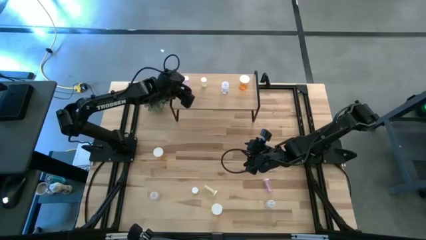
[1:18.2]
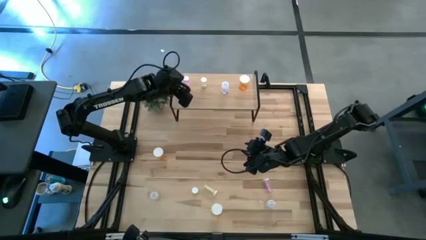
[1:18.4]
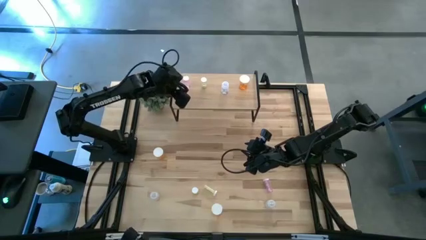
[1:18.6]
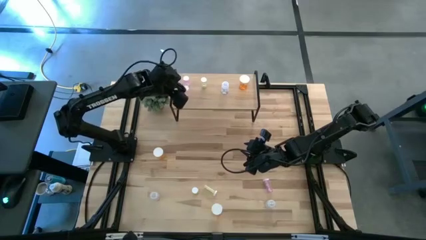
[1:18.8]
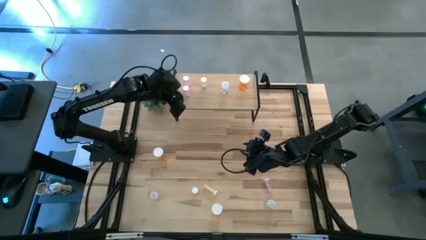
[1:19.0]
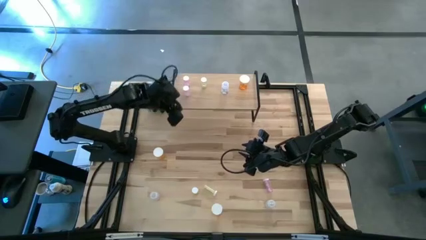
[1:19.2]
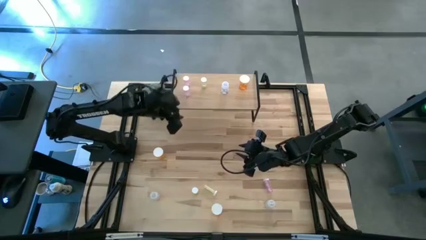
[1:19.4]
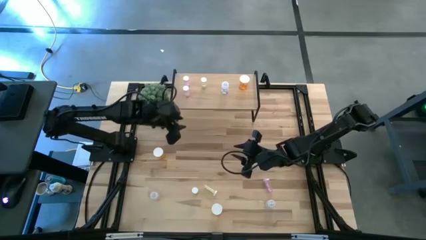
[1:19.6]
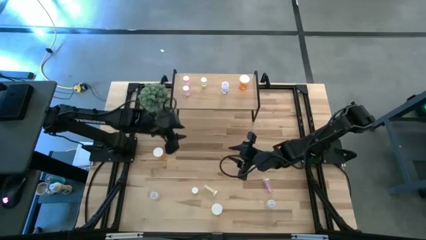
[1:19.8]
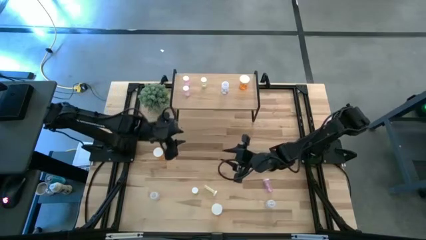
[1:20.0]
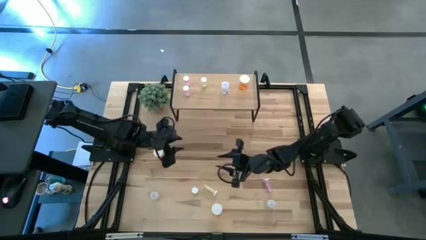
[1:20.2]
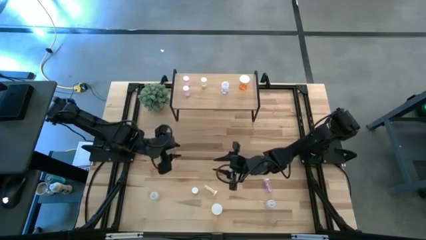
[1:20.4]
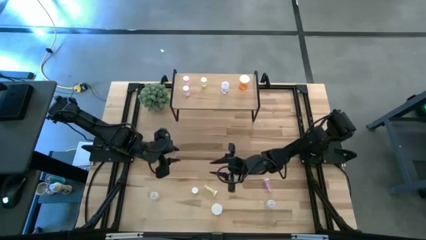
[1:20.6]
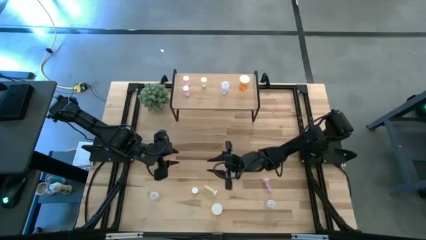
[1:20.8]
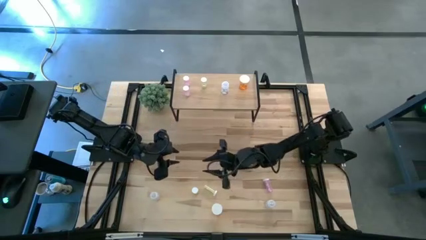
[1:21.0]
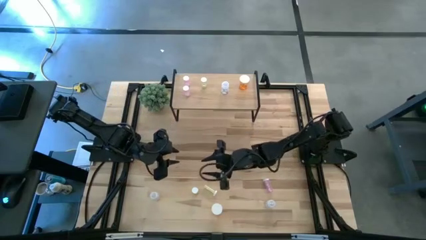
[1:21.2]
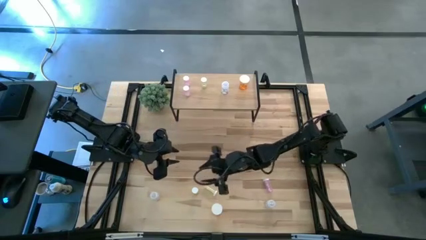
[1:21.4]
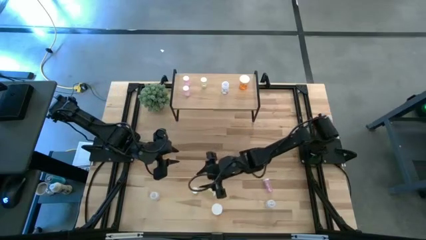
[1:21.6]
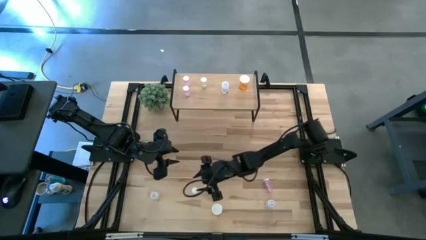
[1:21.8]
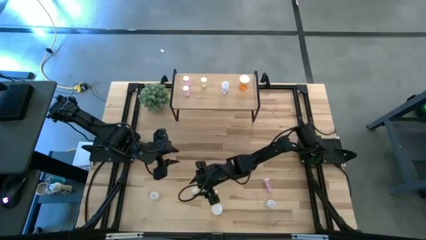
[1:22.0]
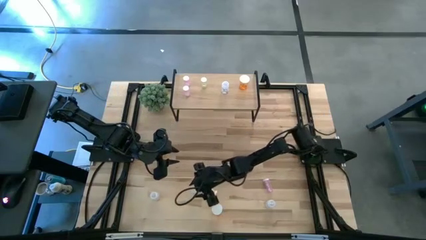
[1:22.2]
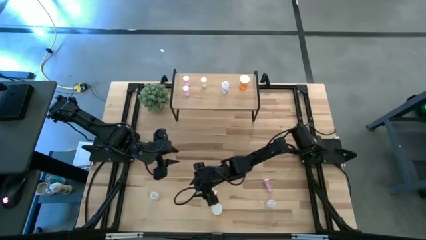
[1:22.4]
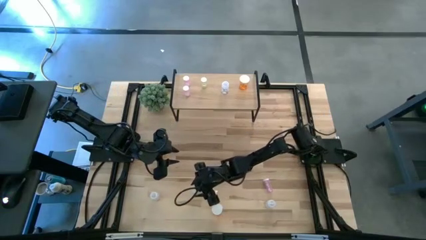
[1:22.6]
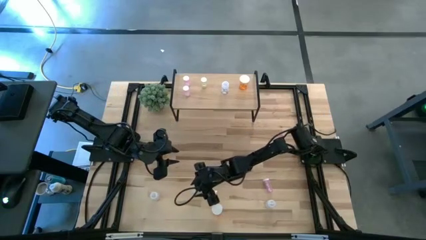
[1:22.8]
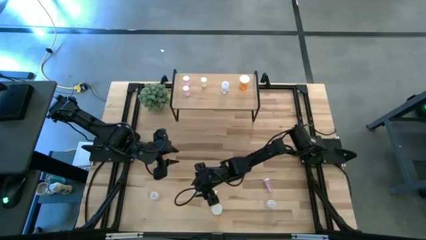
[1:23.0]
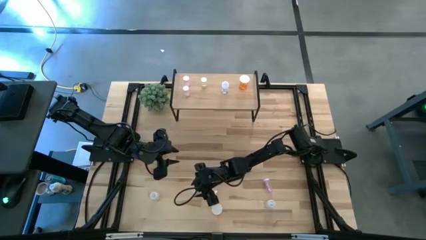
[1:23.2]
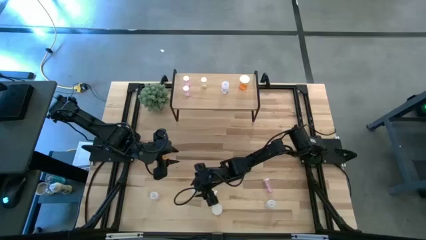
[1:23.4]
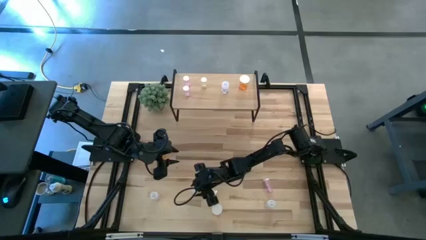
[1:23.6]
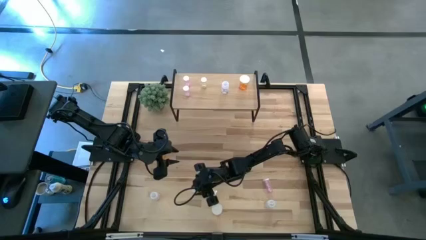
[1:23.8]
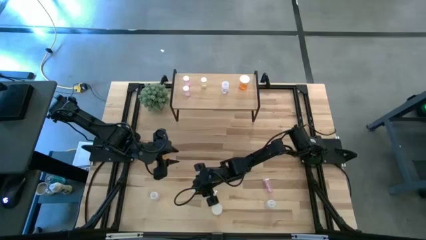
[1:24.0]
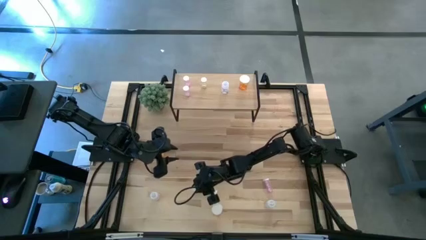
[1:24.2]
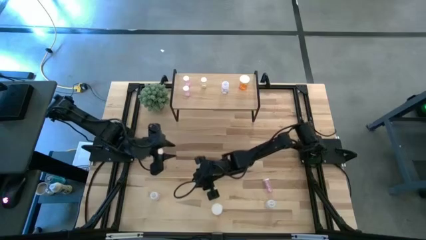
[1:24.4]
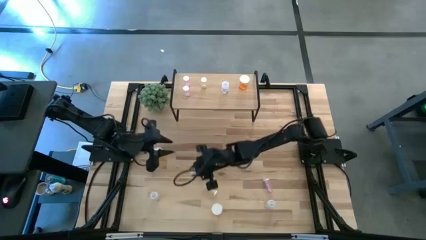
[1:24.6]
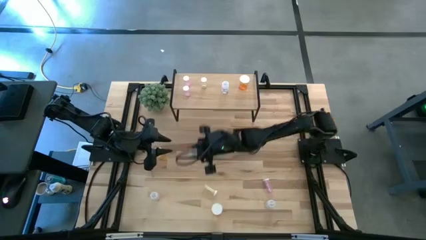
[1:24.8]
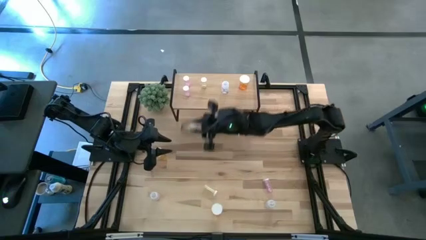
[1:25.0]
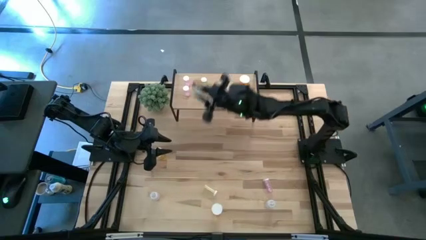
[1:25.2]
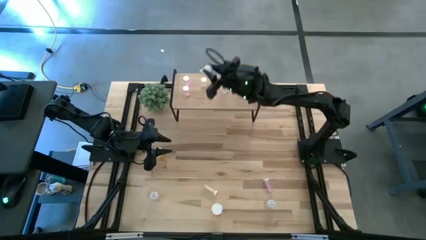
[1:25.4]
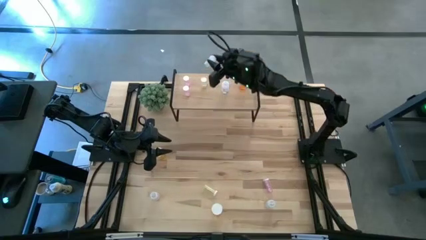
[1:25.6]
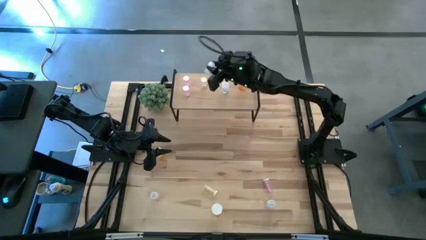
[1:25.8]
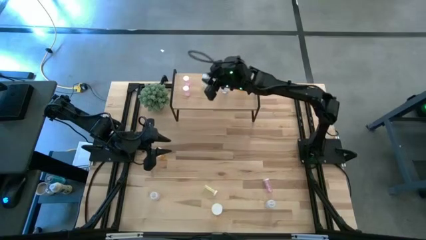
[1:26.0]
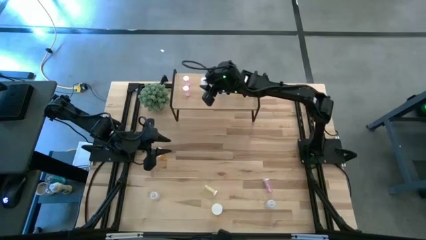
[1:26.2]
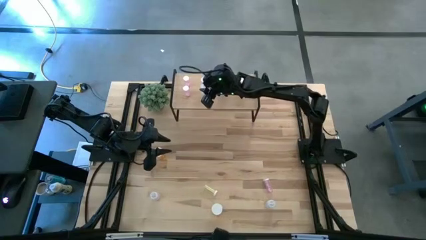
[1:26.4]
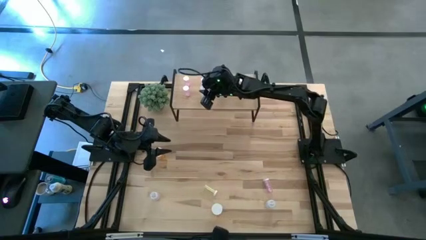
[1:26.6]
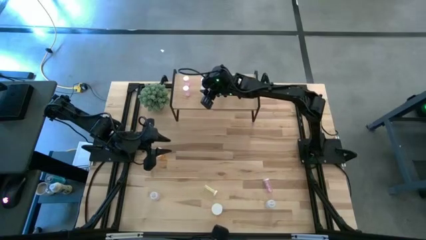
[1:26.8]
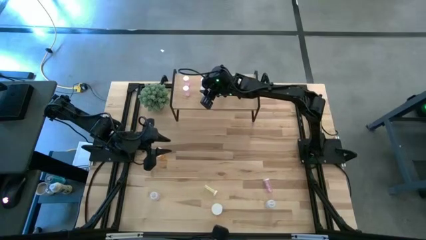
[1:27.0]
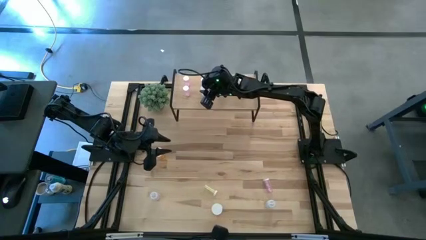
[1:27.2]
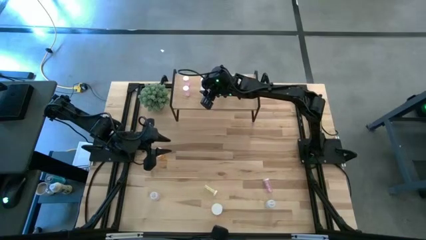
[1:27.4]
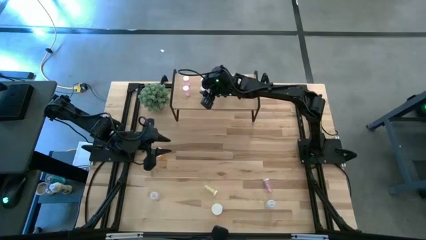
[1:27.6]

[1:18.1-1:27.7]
Task: Pick and place medicine bottles onto shelf by color
Put the left yellow pill bottle aligned with the other yellow pill bottle on the shelf

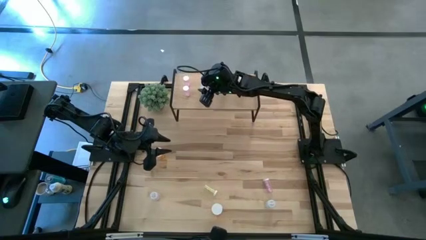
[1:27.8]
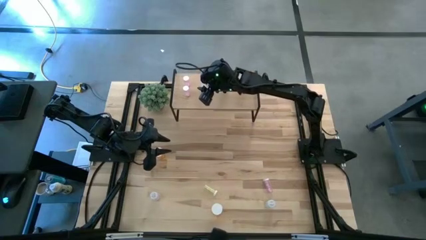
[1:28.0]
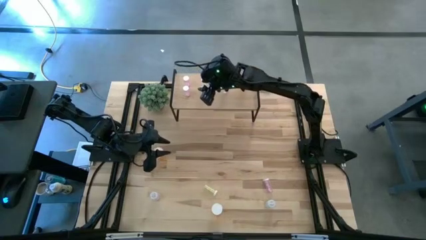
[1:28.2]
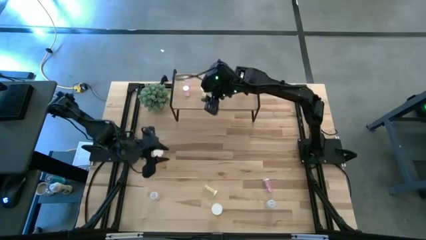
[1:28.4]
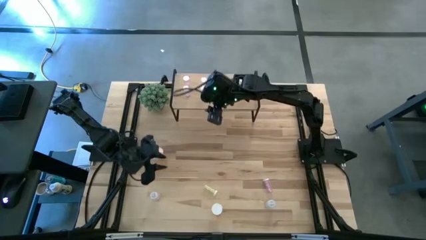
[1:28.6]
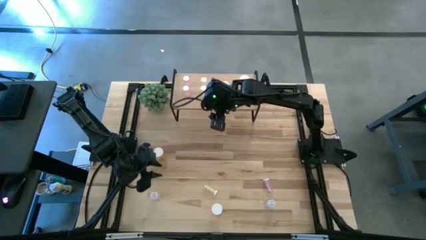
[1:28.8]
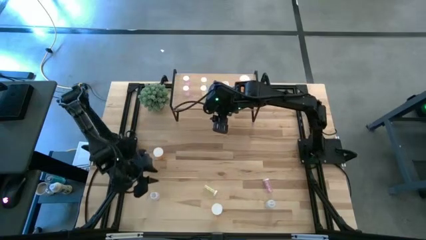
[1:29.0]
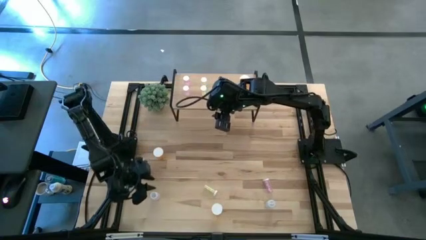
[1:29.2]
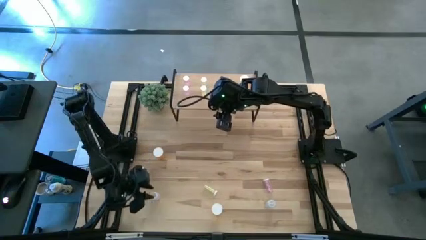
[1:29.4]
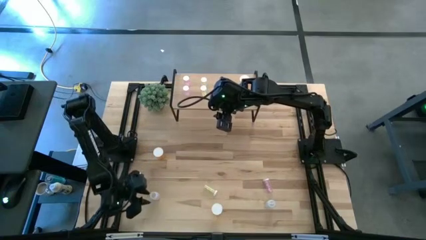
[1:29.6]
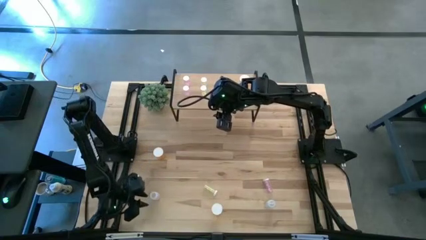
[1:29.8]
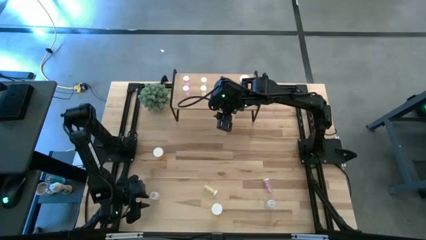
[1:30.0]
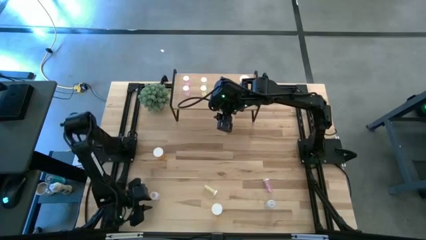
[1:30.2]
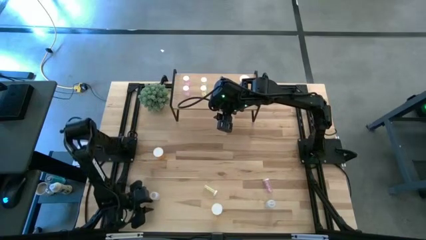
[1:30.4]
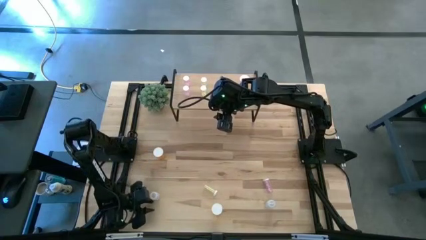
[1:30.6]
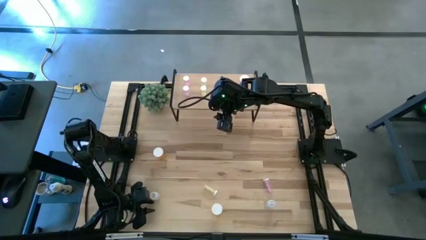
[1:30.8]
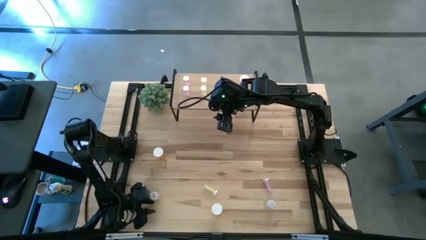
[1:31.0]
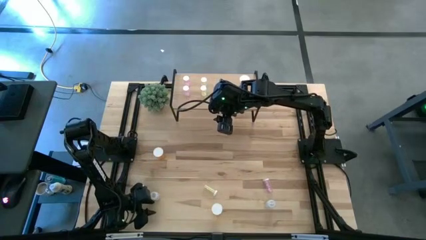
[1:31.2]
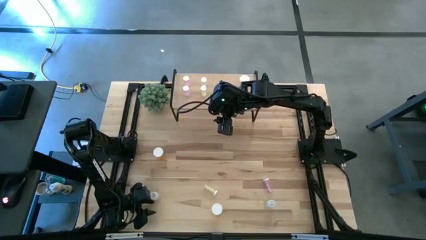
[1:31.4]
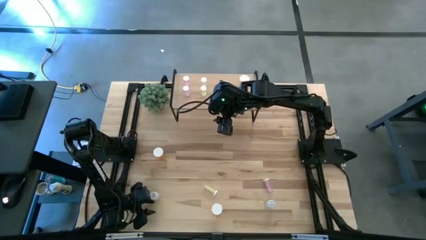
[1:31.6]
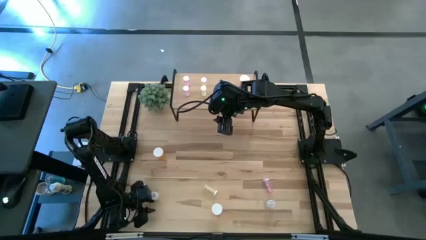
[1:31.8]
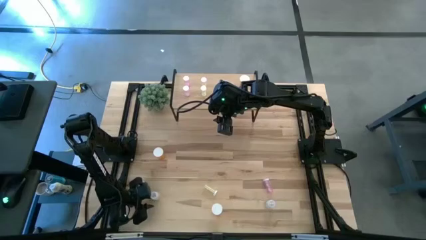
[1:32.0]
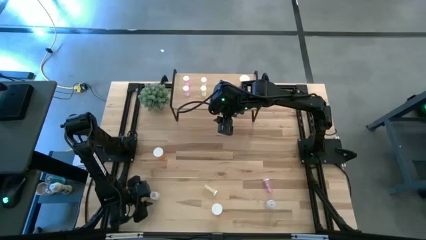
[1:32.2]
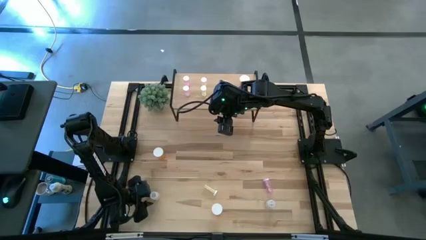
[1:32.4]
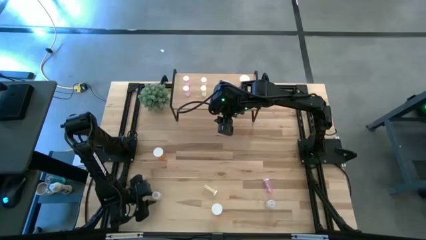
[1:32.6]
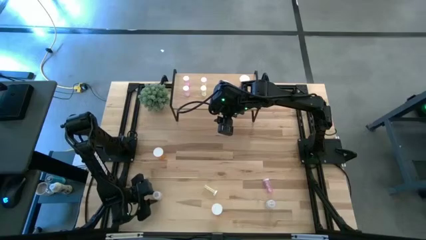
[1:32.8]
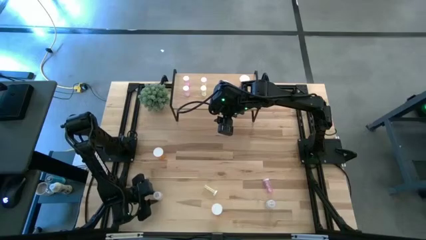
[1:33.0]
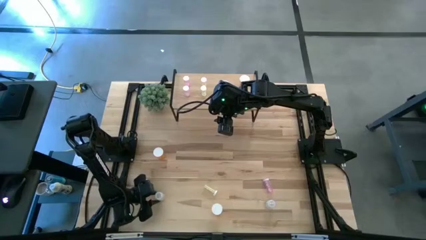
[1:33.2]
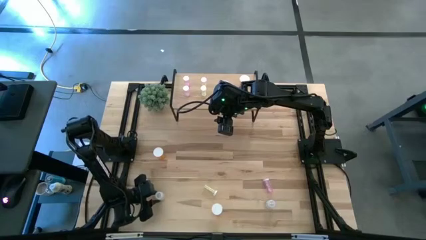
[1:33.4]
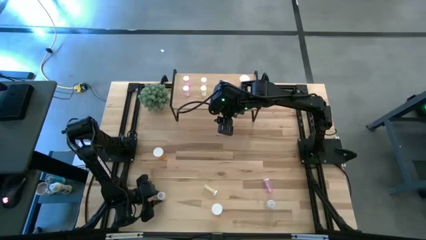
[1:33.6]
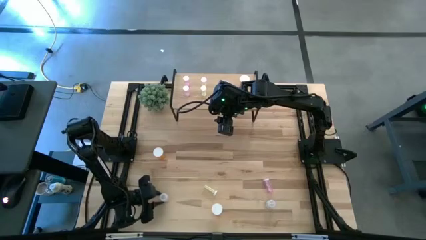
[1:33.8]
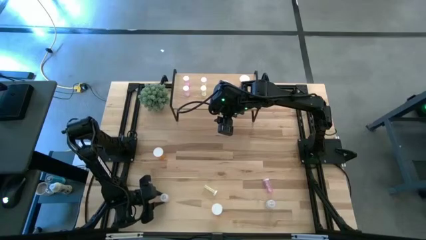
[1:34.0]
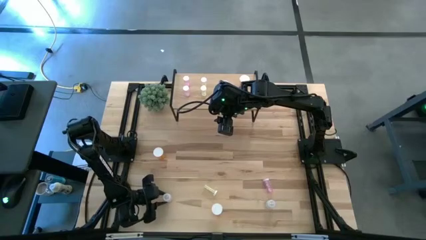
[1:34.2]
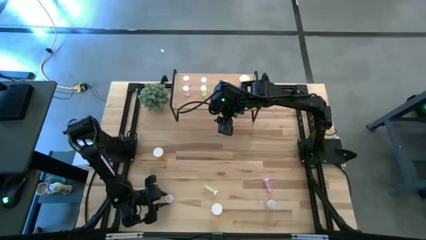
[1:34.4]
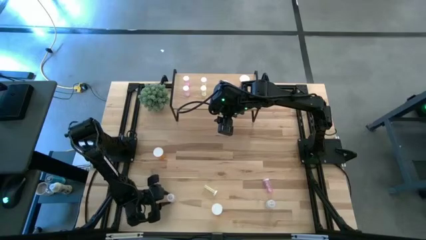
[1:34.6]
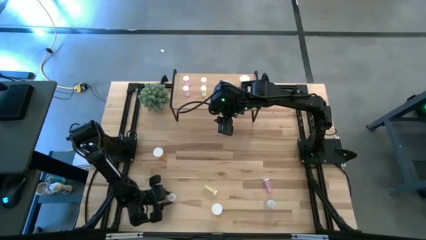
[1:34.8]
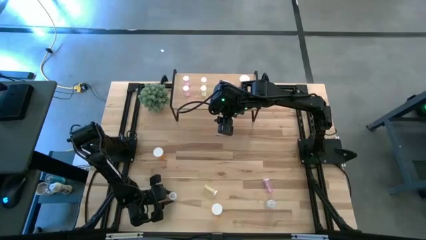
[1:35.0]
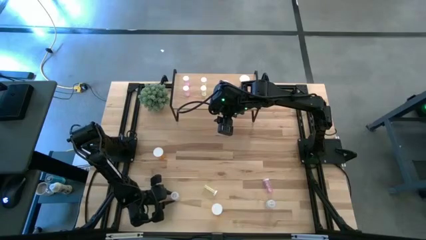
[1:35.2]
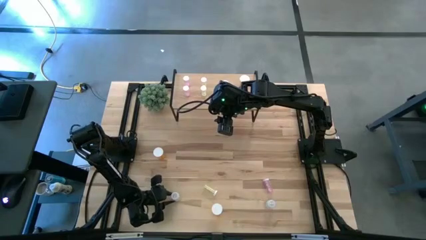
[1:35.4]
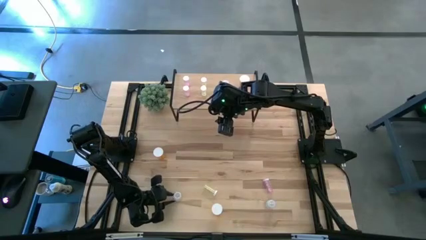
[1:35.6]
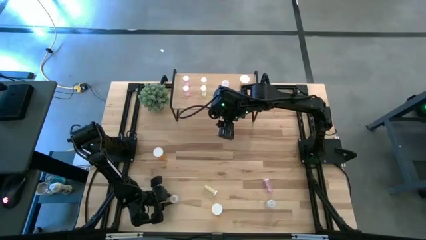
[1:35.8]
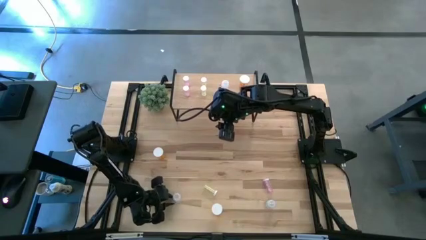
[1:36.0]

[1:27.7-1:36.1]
Put the left transparent pill bottle aligned with the other transparent pill bottle on the shelf
